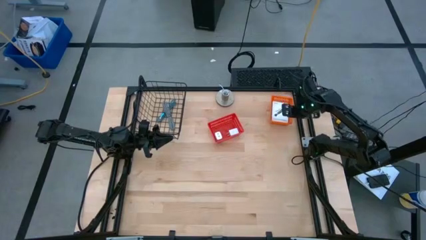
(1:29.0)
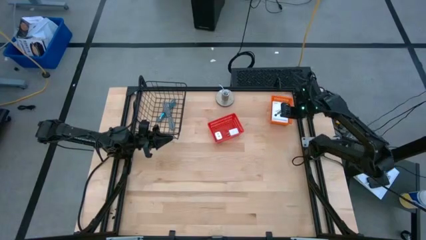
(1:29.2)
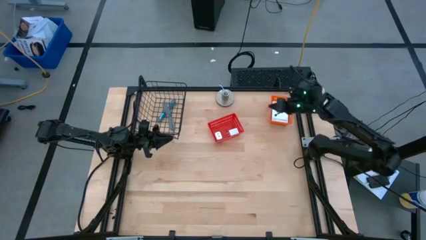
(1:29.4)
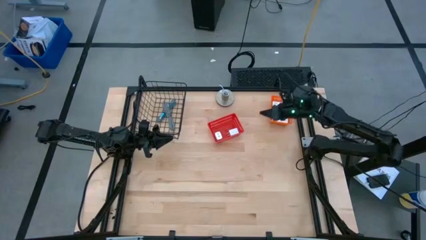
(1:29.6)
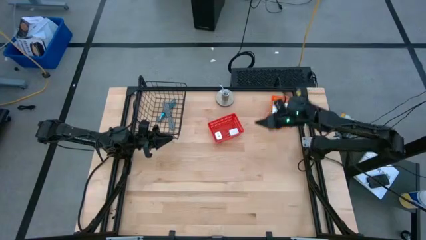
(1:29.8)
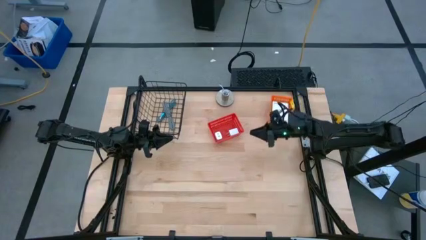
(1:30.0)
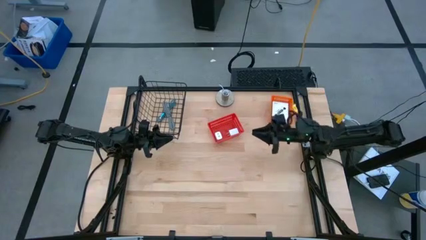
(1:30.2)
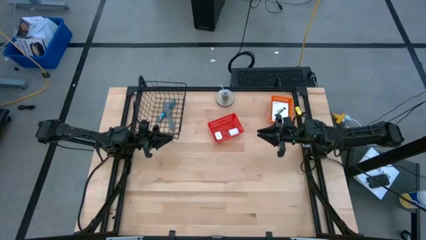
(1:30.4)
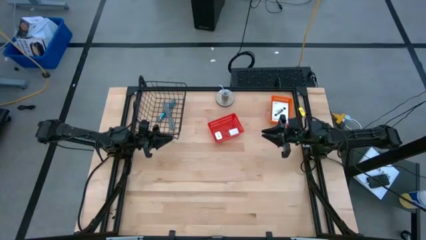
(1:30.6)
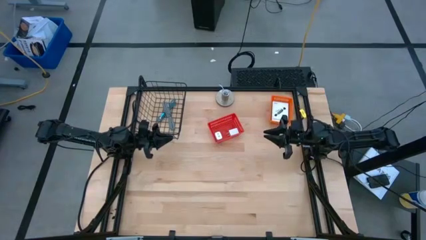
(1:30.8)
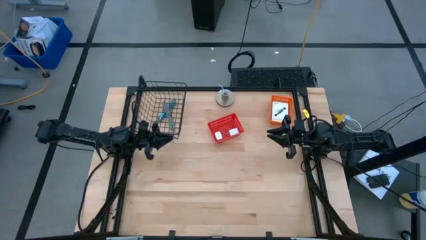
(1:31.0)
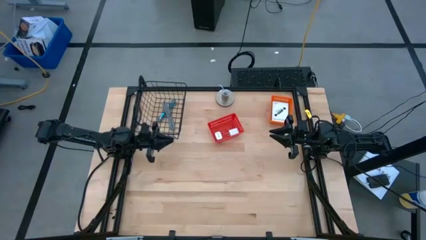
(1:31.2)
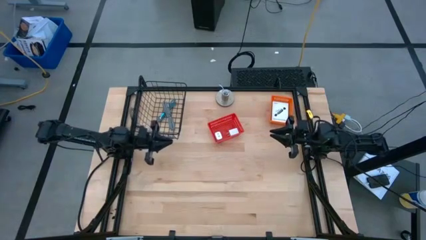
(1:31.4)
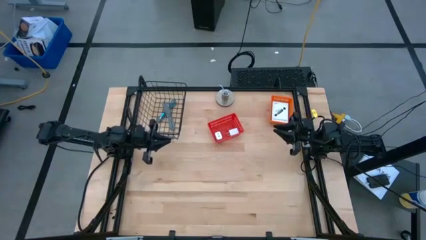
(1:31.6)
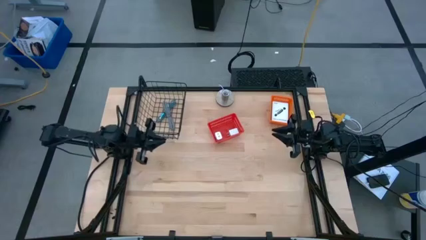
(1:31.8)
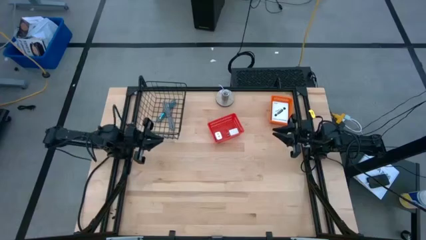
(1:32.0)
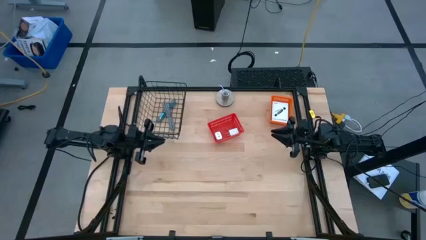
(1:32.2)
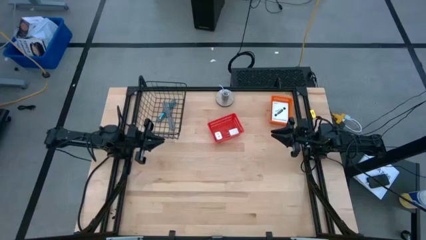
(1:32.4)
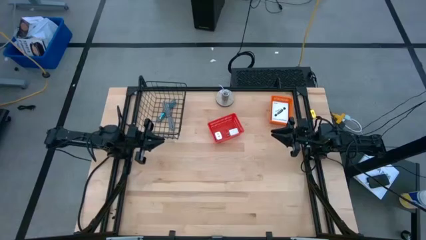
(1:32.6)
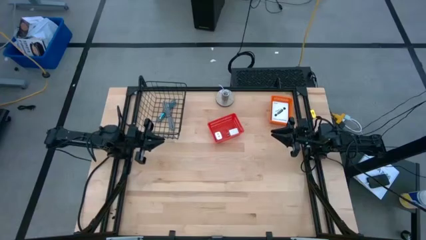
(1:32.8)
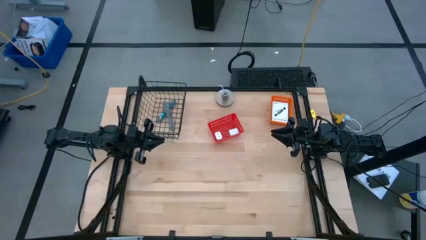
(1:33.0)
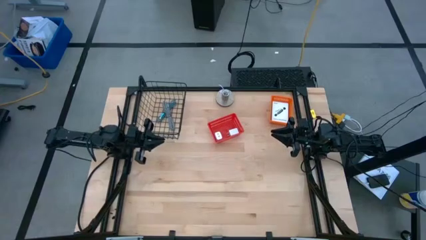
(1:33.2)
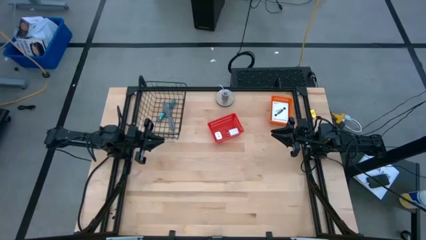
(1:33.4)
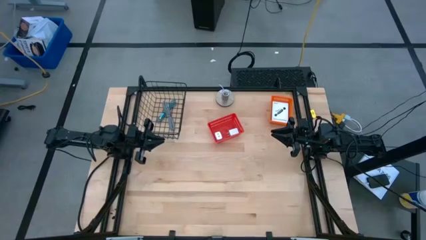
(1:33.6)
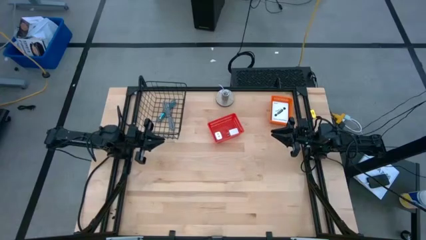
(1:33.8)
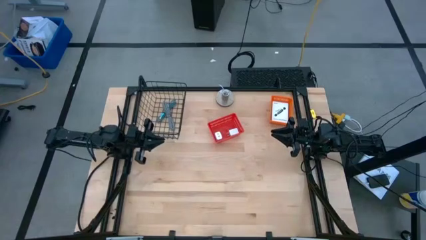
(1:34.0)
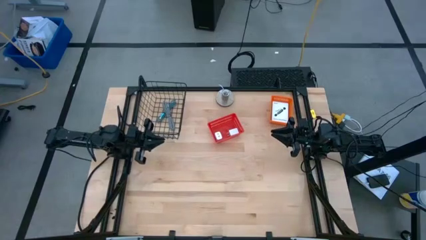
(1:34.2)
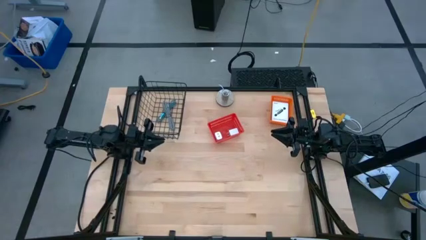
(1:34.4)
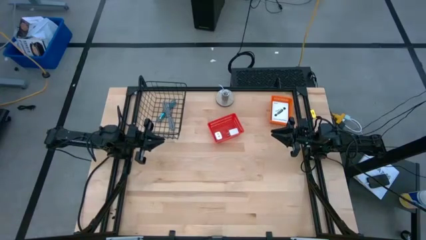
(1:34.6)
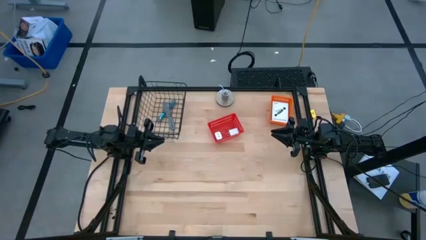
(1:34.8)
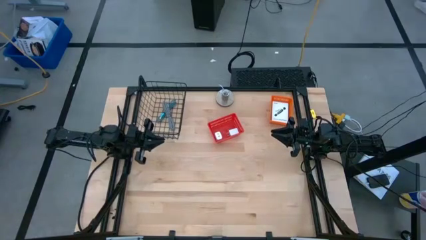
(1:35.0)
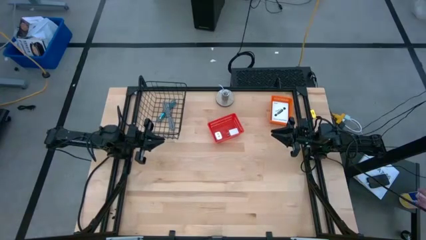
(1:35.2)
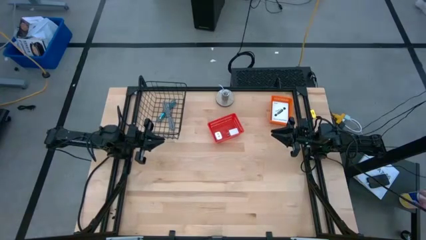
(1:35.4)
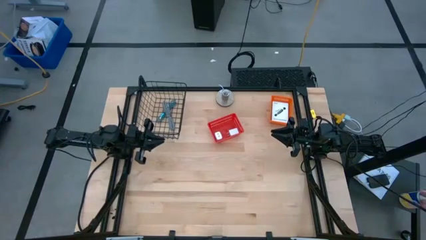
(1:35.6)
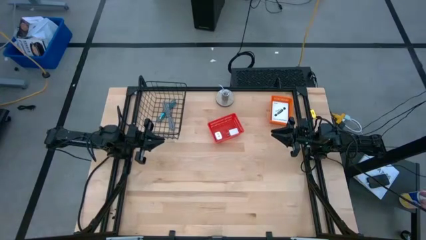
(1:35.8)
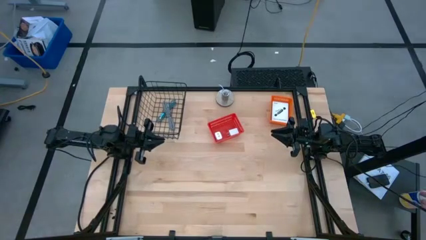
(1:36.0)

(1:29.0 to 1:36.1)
Task: Pick and place items into bin
Return to Home Position

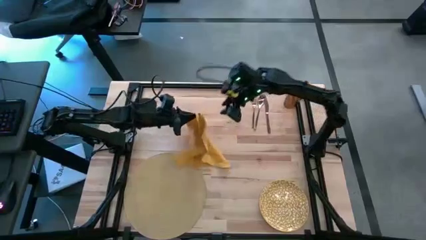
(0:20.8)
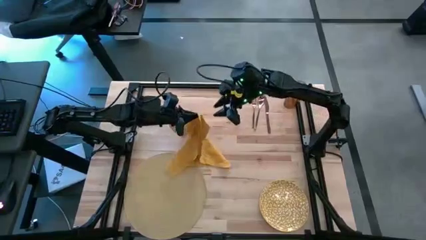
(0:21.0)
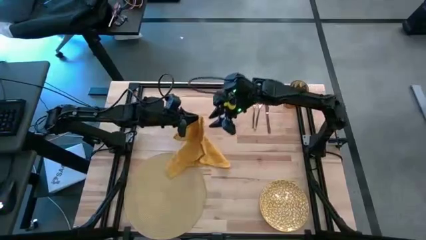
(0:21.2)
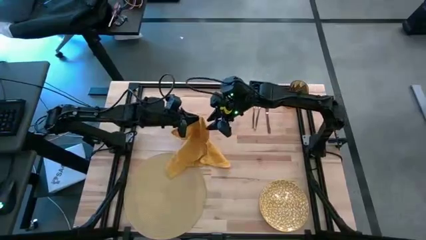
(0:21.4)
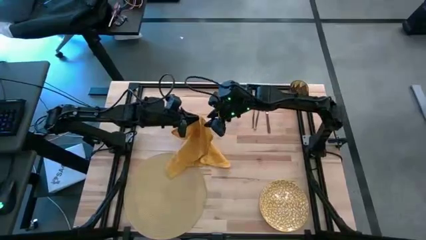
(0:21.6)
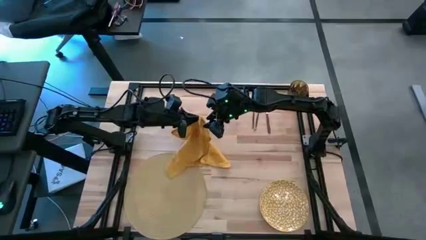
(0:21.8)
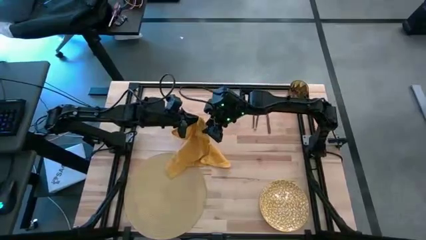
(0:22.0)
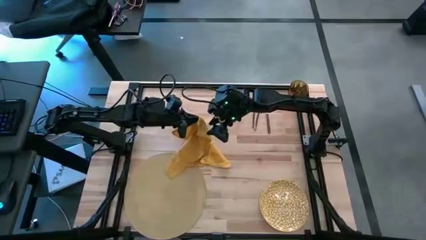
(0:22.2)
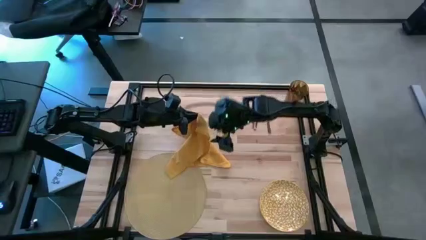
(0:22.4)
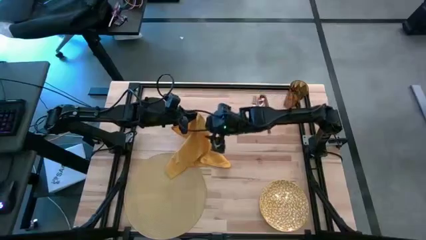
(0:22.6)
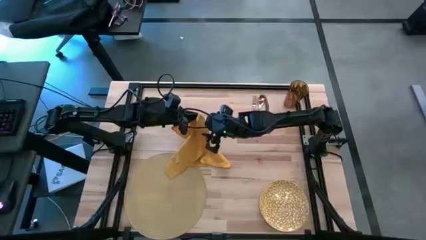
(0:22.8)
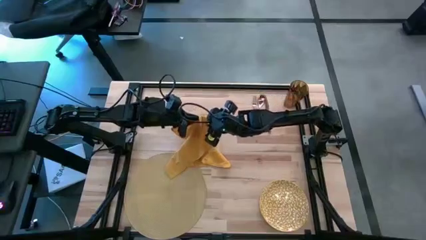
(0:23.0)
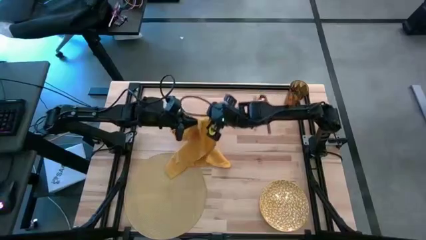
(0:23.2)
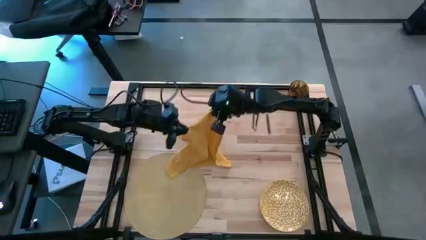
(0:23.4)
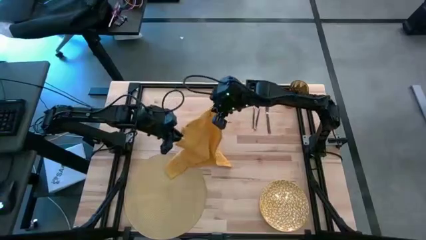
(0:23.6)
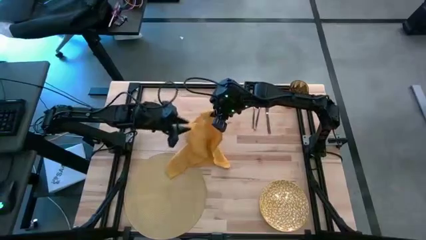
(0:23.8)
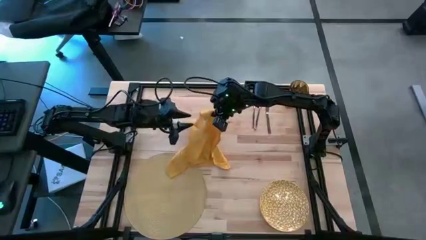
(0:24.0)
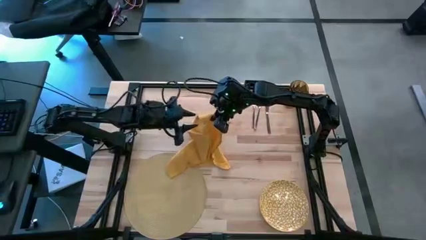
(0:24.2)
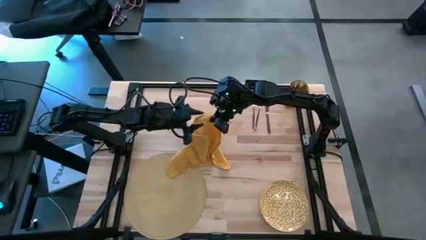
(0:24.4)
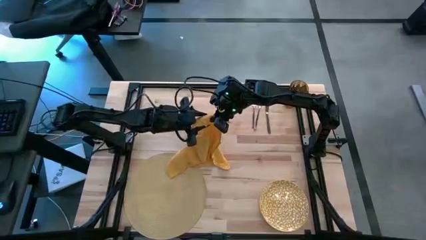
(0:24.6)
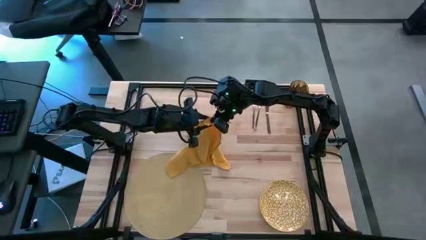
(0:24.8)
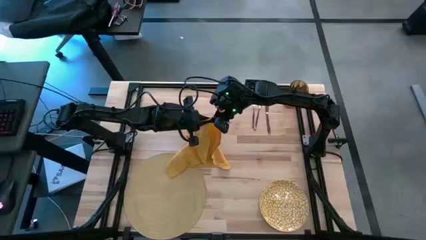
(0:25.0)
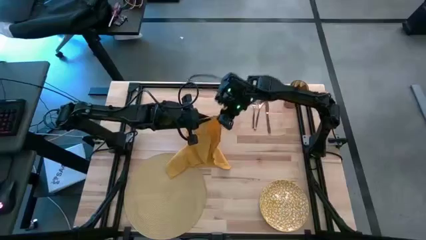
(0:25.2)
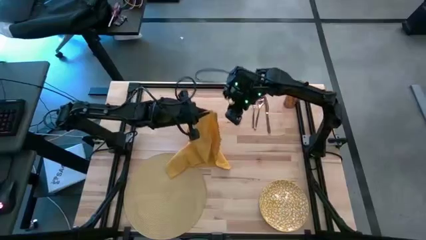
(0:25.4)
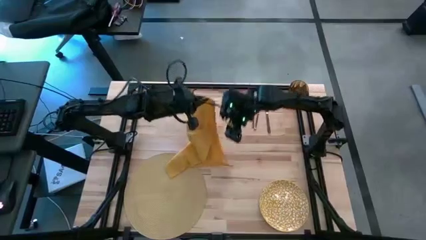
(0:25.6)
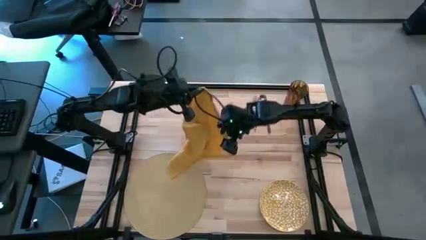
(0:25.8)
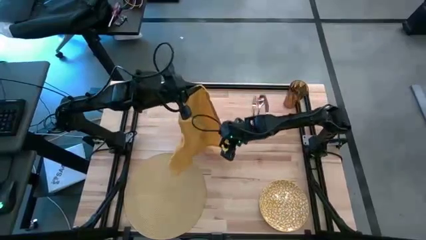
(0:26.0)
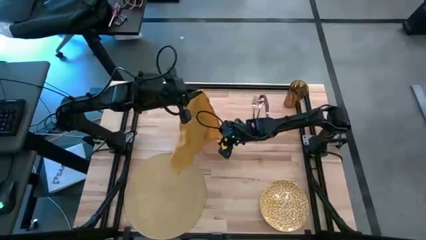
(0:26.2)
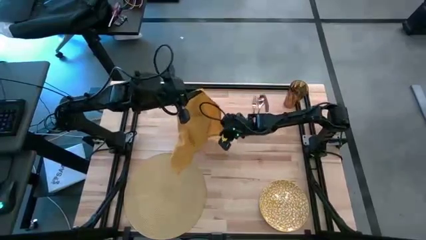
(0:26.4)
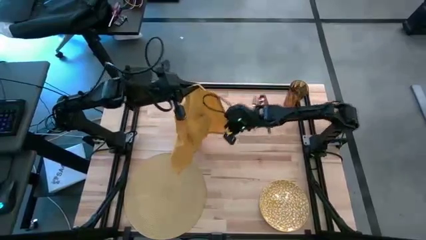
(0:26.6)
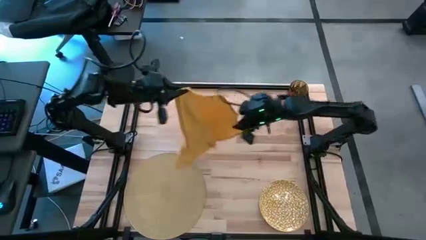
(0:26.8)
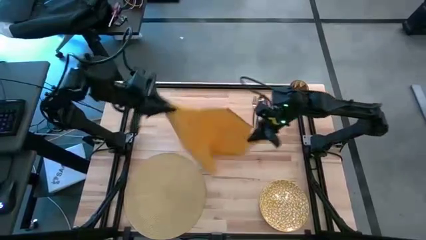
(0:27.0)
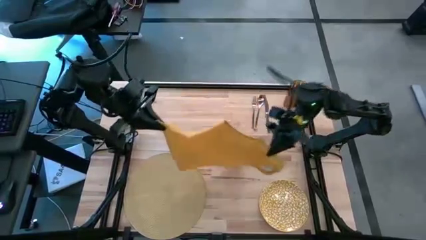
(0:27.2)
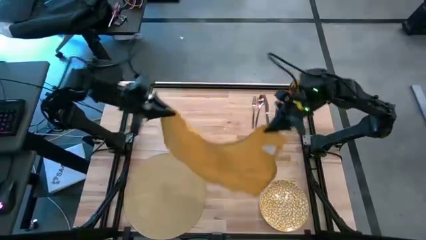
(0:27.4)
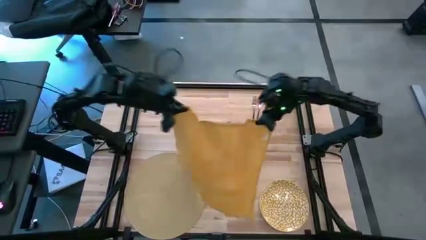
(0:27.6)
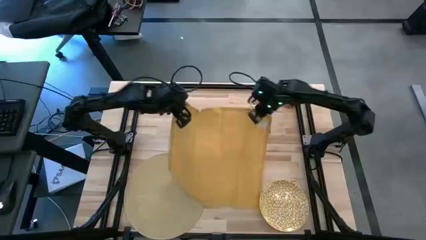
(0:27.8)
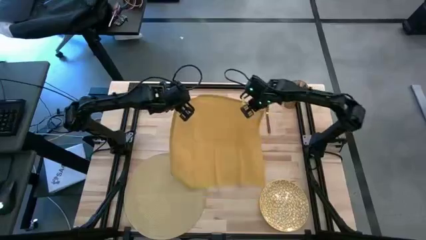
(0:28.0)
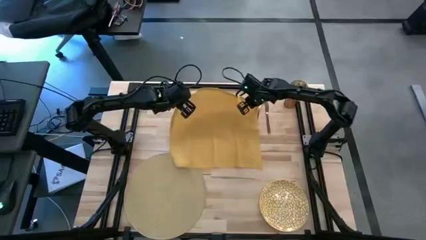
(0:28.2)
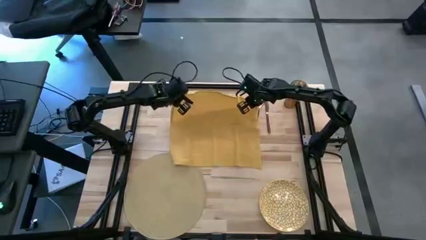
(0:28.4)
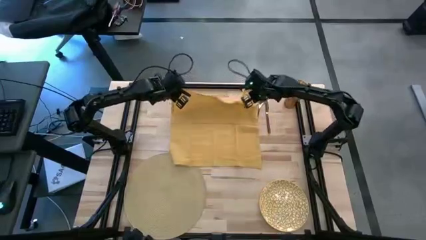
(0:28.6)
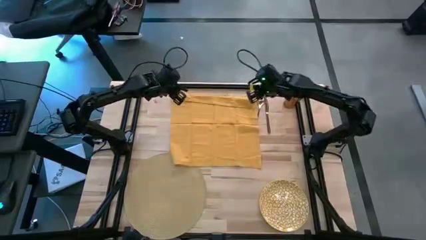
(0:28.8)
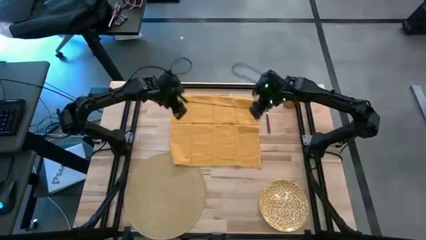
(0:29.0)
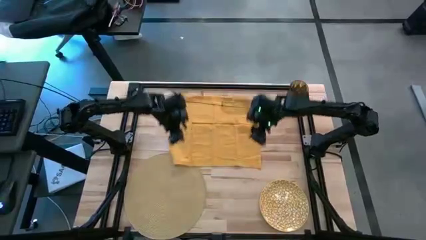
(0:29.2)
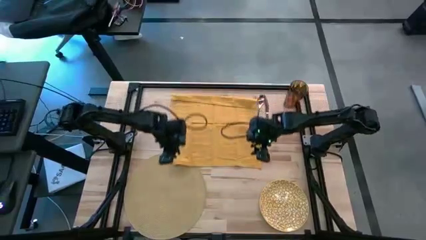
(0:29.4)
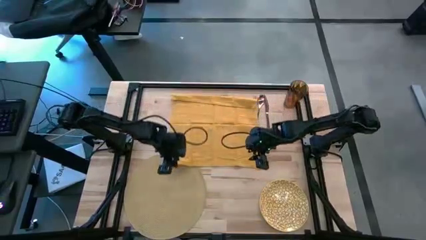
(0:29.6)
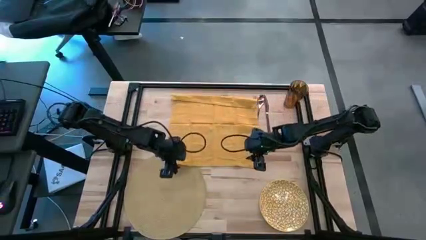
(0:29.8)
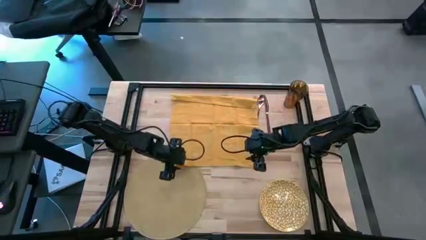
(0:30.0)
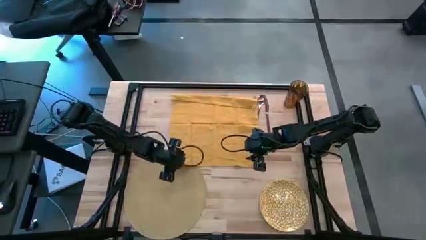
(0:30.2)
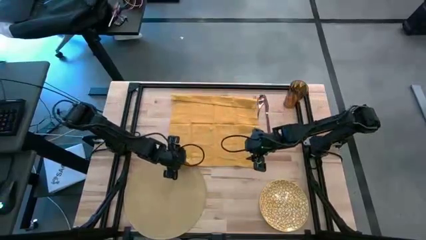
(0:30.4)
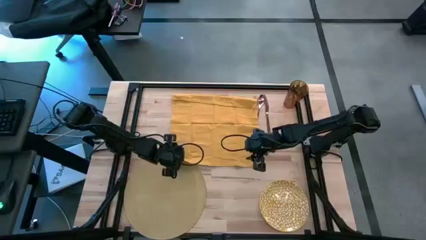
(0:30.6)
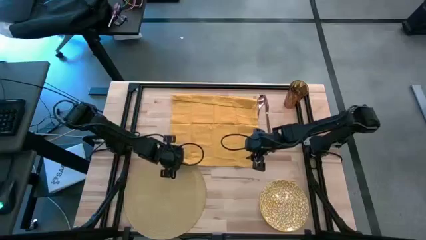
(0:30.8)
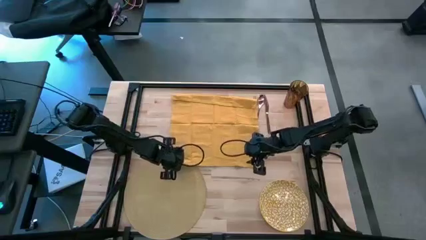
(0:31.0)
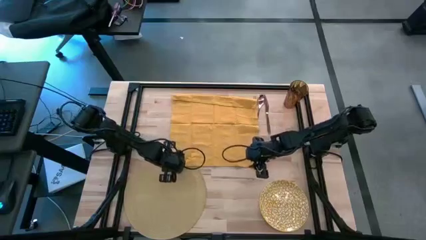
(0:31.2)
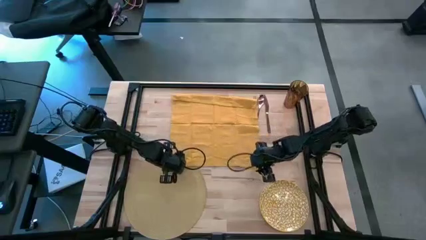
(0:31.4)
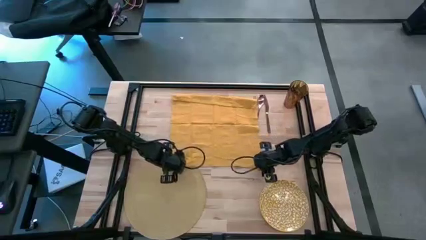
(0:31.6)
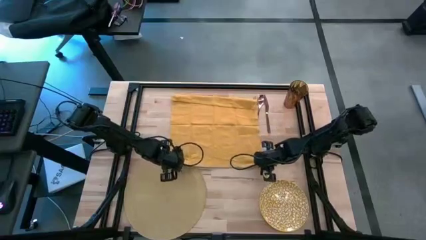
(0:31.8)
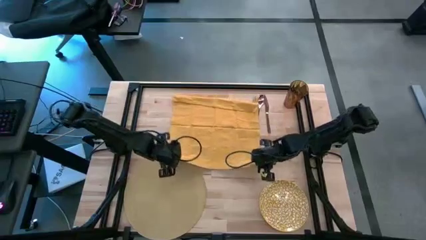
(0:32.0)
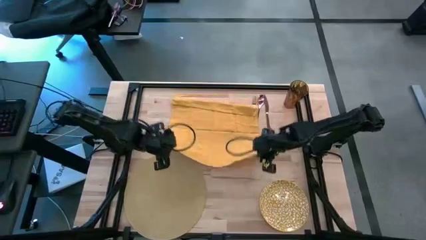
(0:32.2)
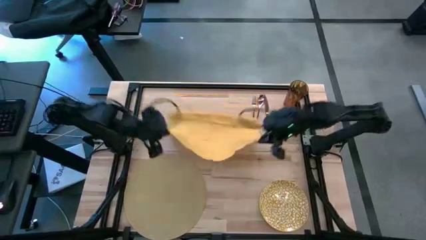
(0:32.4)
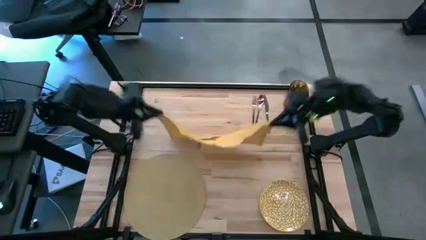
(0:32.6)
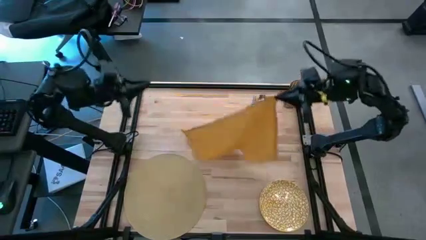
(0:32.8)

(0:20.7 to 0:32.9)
Task: Set table place
Fold the yellow napkin
